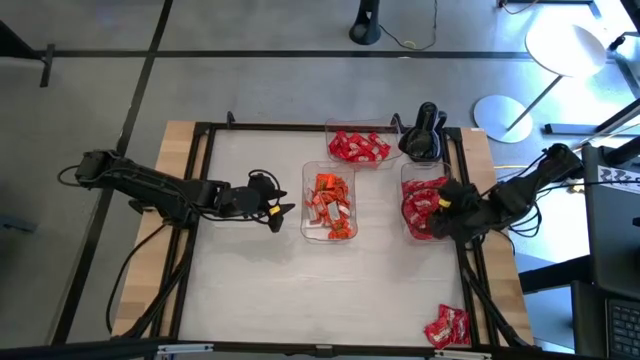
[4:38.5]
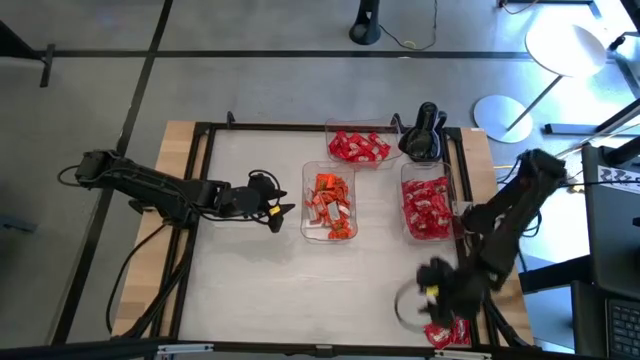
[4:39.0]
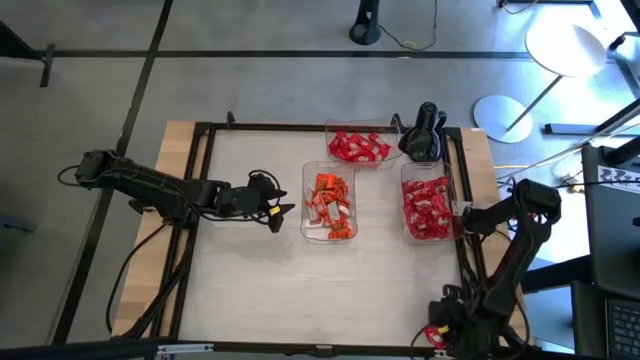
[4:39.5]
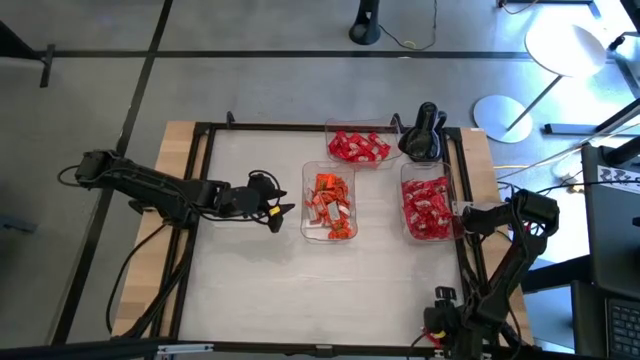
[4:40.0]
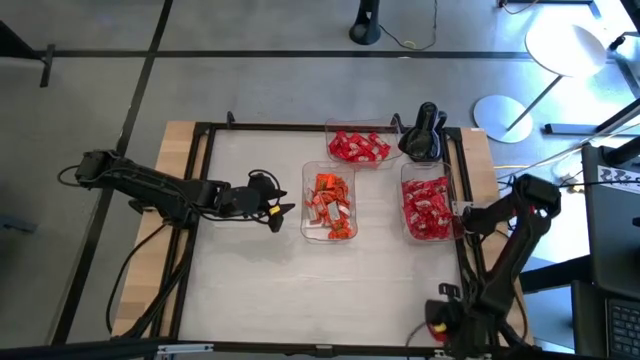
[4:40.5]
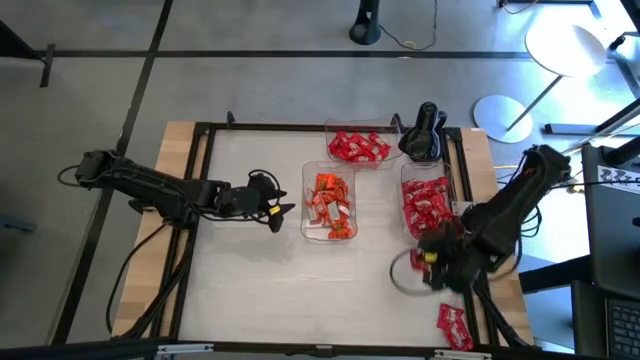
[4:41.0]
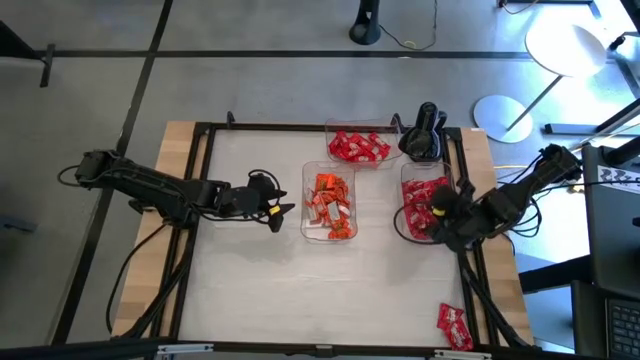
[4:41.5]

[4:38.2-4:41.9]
Task: Sort candy
Put the red candy pack into the bottom right transparent bin

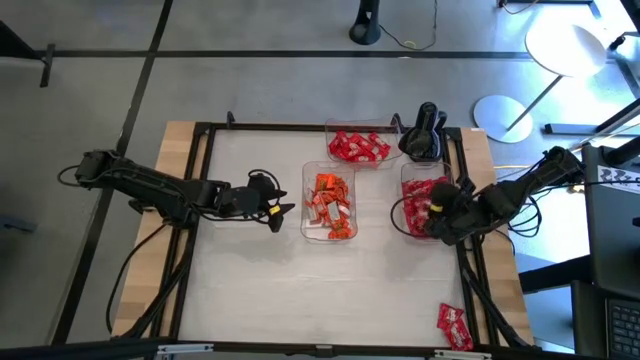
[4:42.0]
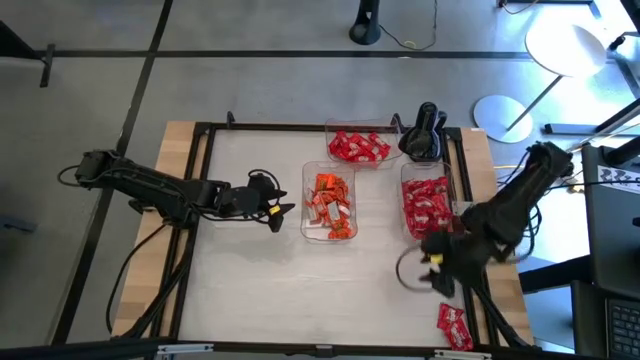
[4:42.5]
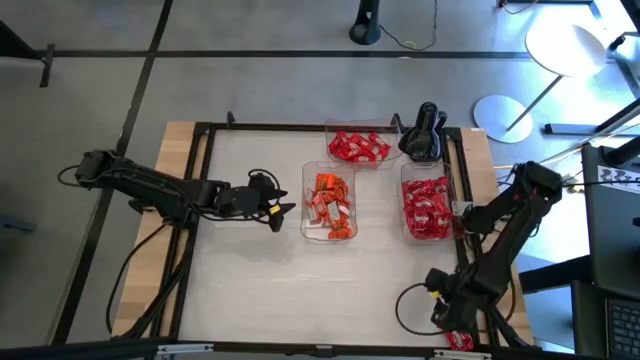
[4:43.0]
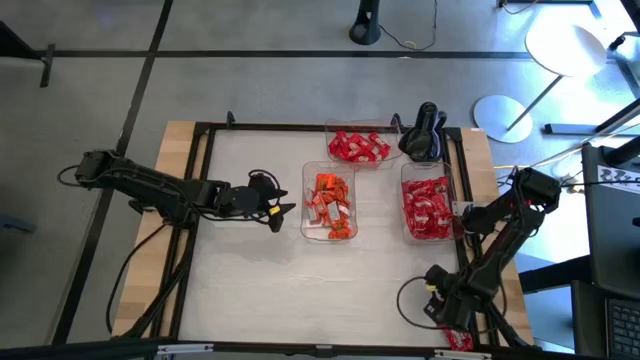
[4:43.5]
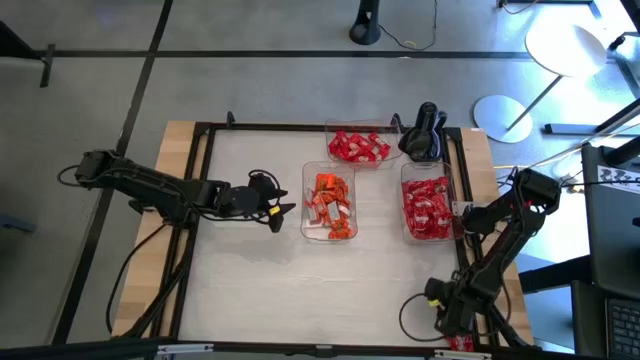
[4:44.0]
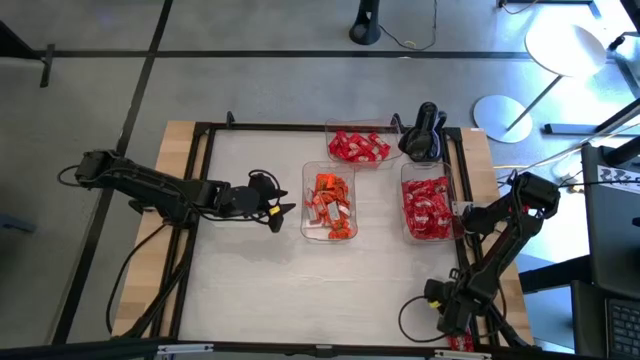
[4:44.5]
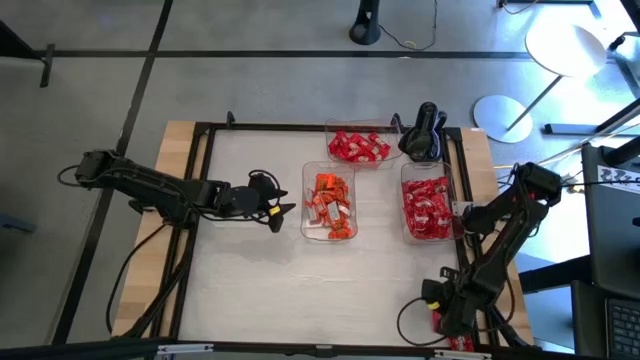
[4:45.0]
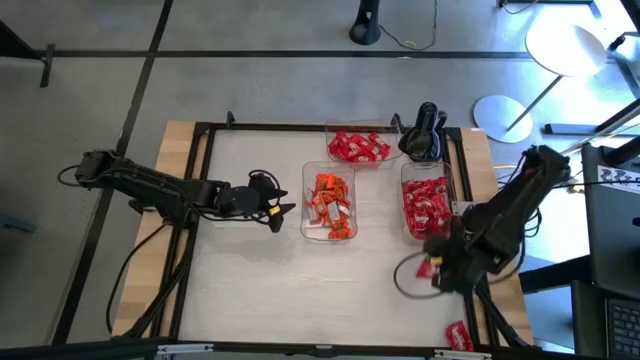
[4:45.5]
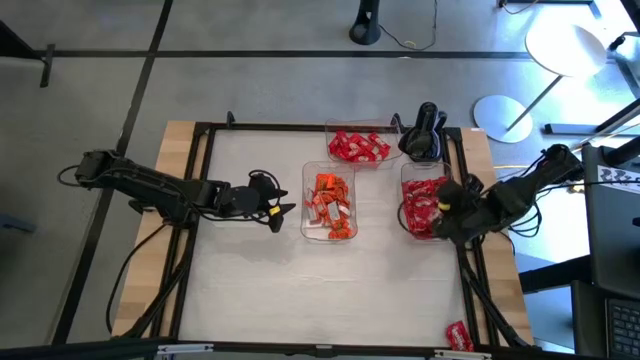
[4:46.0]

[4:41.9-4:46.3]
Put the red candy pack into the bottom right transparent bin

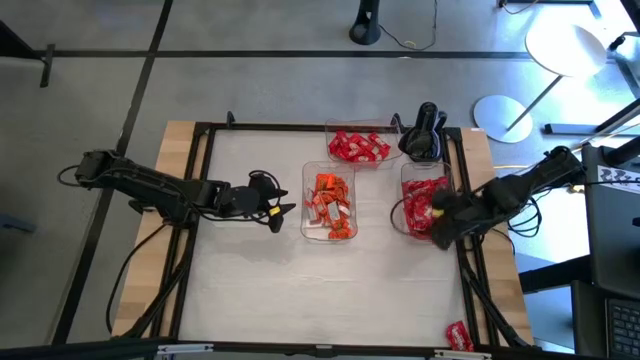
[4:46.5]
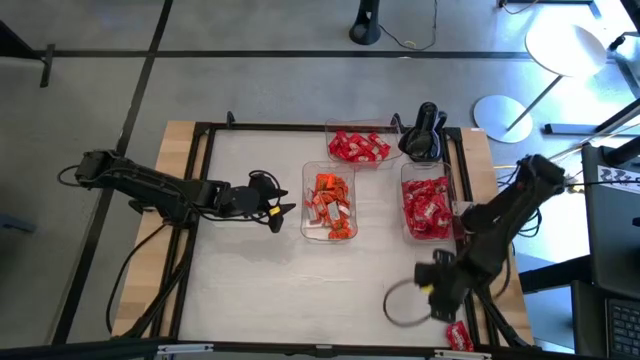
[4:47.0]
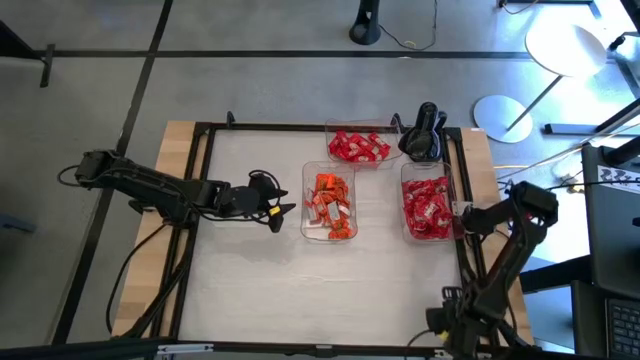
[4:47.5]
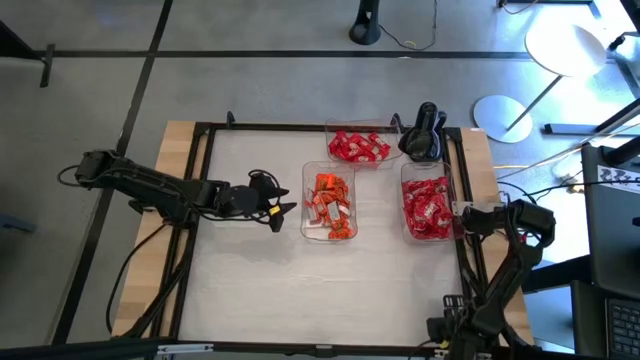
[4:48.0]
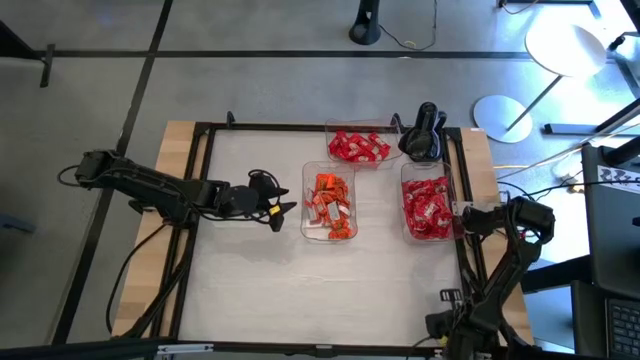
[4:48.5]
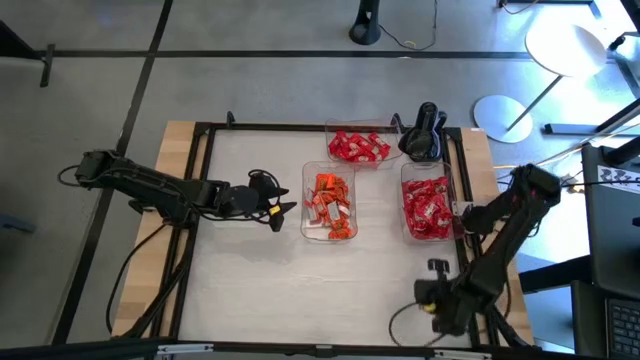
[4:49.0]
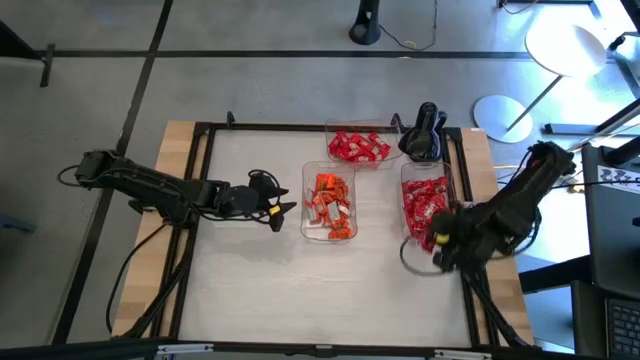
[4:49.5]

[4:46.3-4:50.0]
Put the red candy pack into the bottom right transparent bin

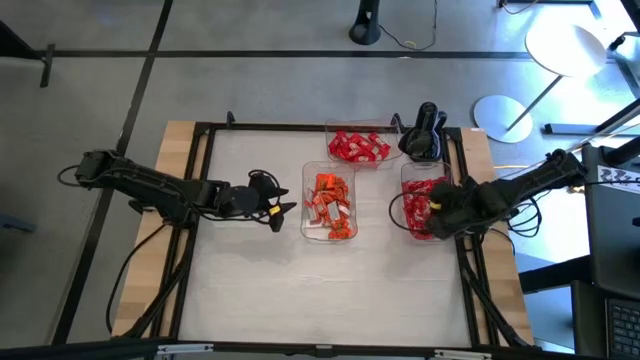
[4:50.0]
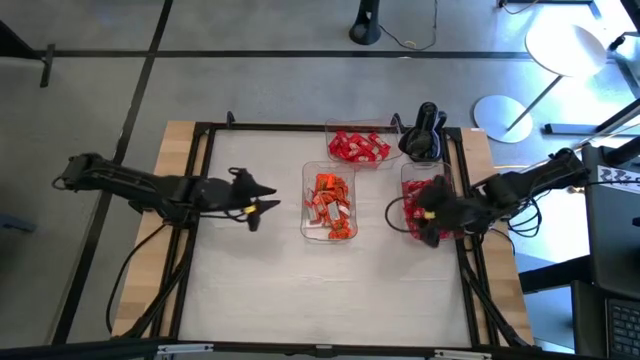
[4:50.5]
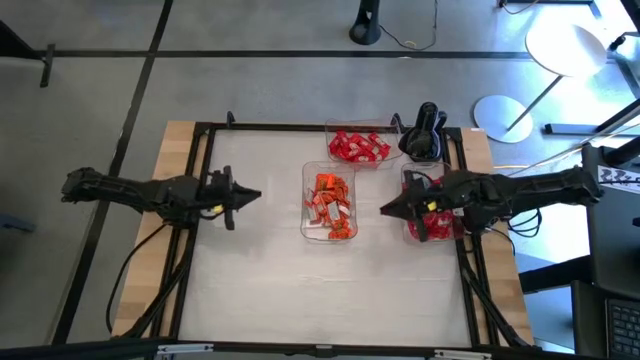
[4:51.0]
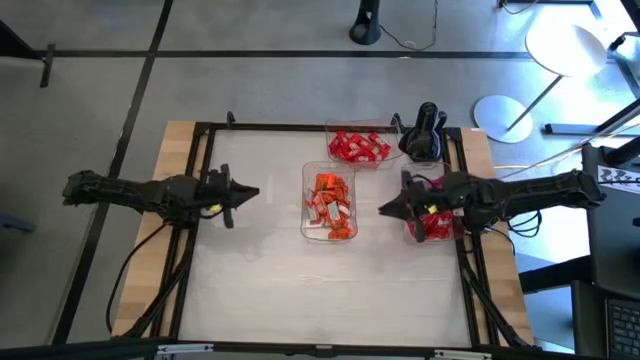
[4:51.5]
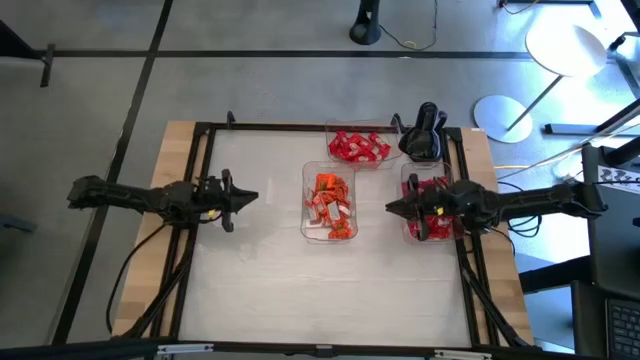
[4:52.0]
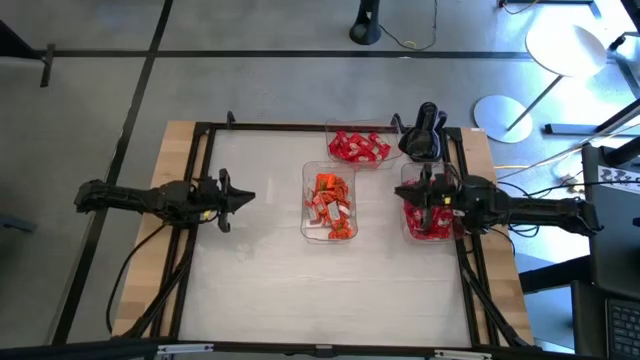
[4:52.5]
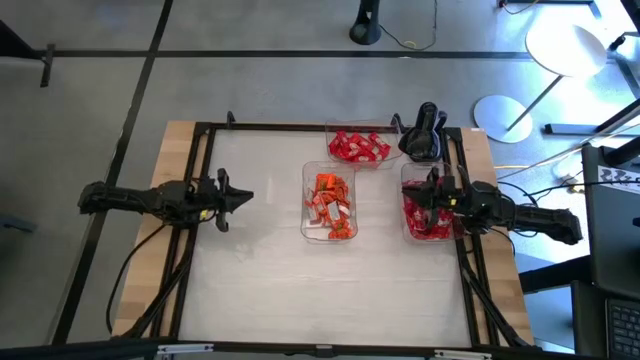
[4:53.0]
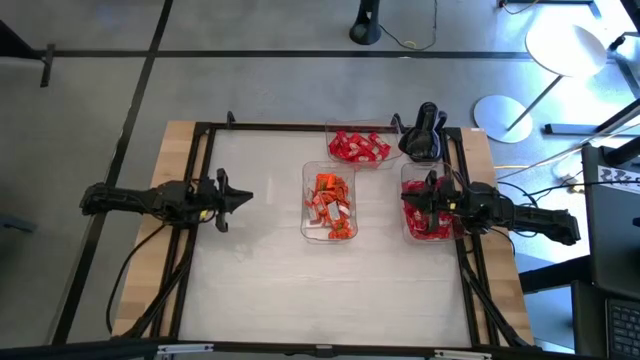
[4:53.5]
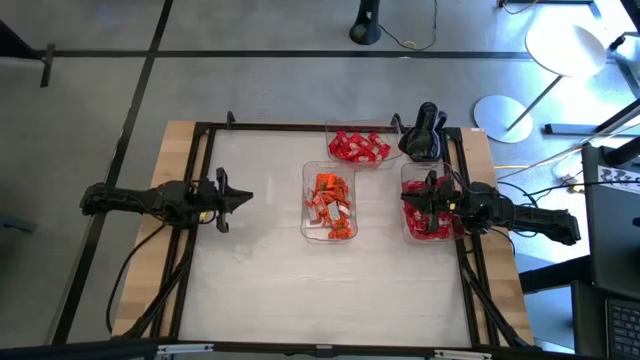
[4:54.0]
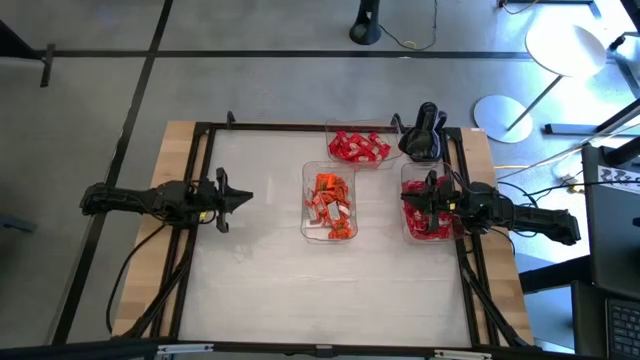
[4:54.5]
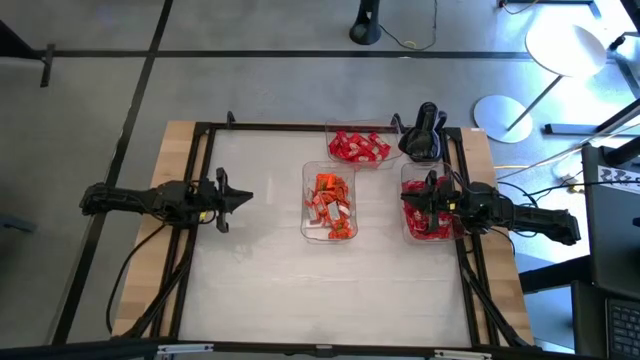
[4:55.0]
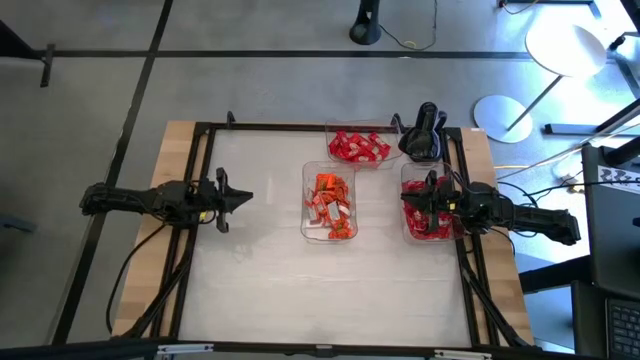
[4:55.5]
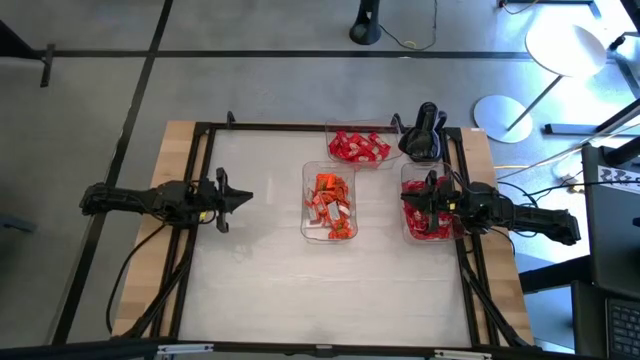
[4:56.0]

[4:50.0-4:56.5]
Return to Home Position

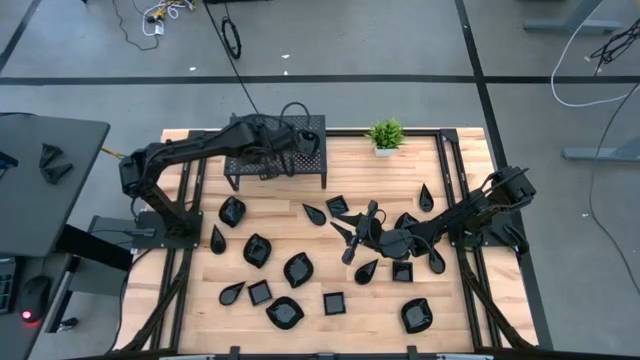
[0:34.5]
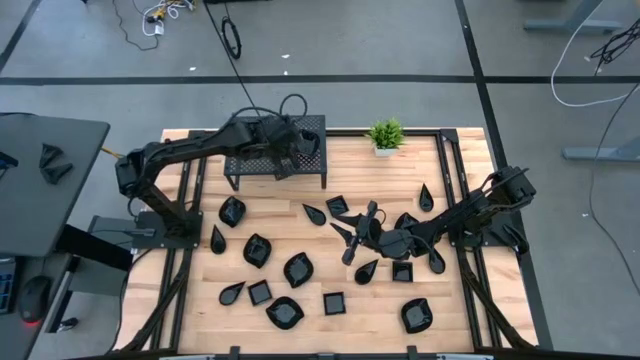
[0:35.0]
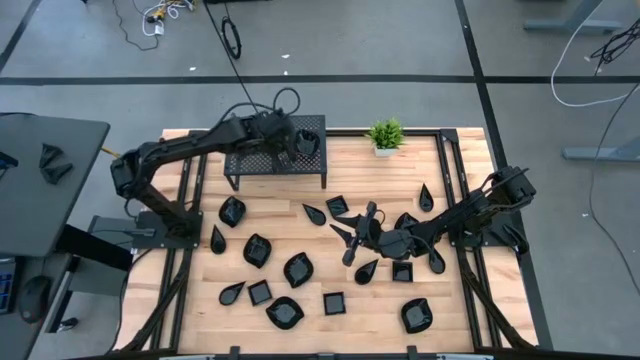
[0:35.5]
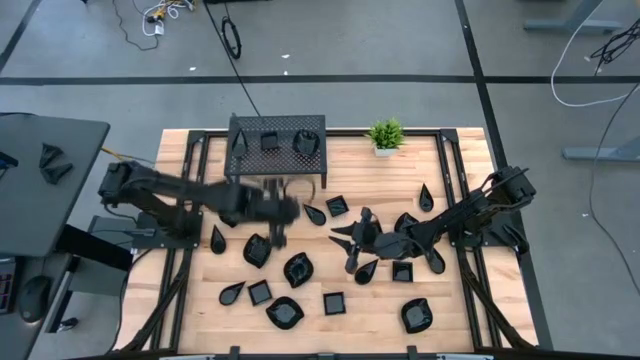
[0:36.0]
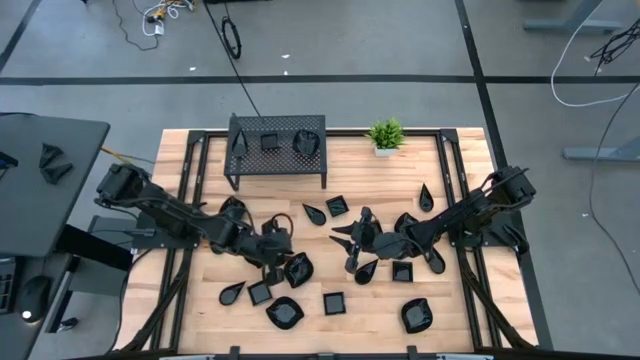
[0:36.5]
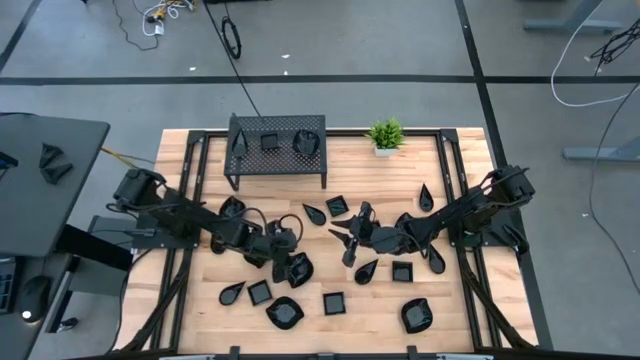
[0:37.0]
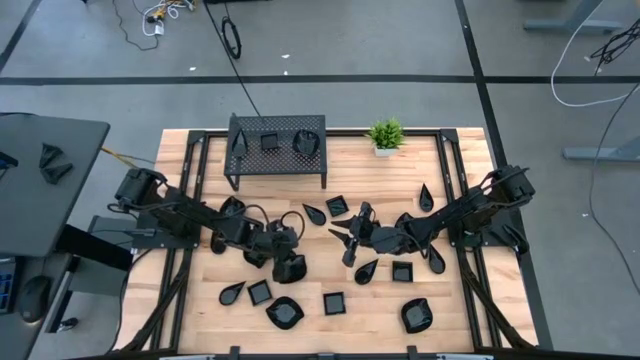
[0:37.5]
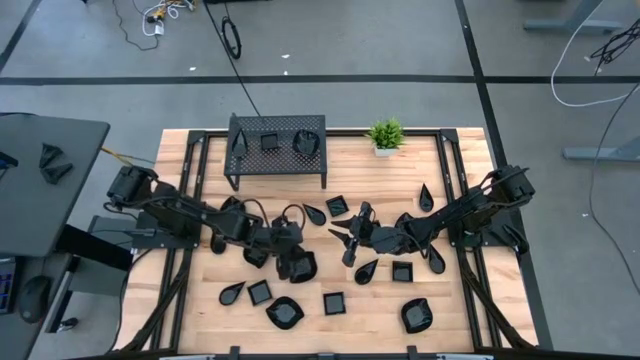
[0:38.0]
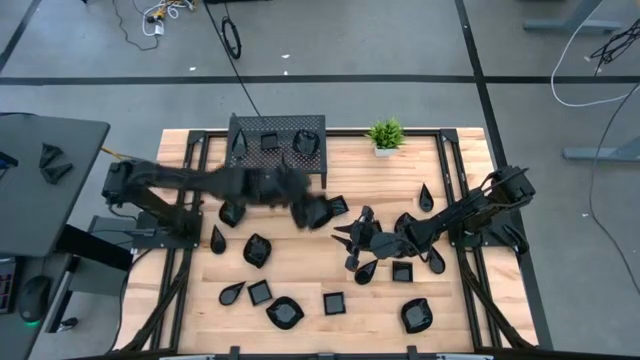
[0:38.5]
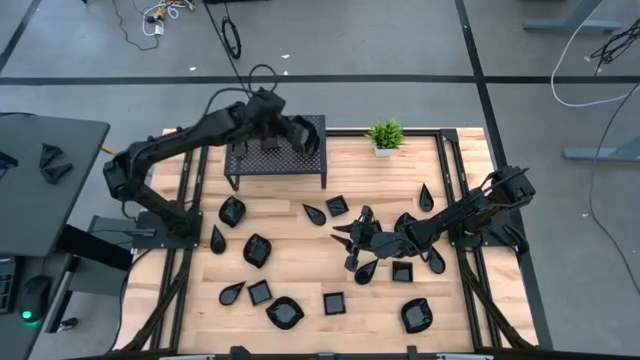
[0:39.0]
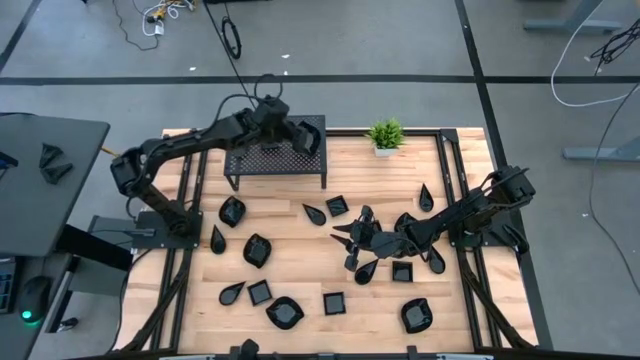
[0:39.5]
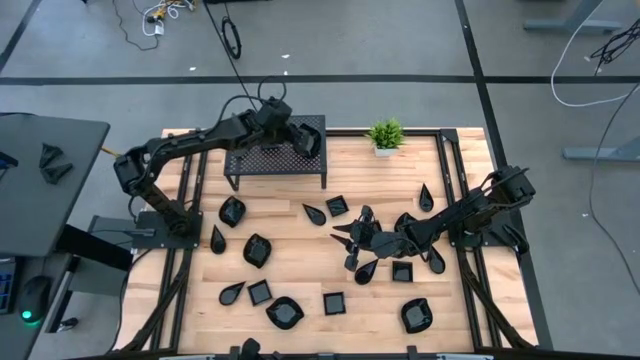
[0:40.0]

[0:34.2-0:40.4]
Task: Pick & Place Mini shaped plates
Stack the black leaf shaped plate on top of the black leaf shaped plate on the shelf
